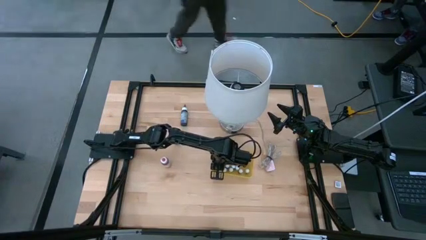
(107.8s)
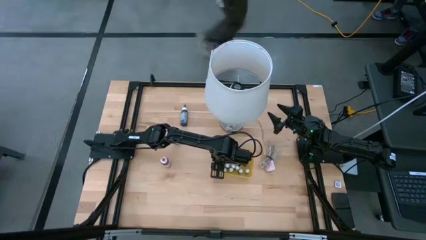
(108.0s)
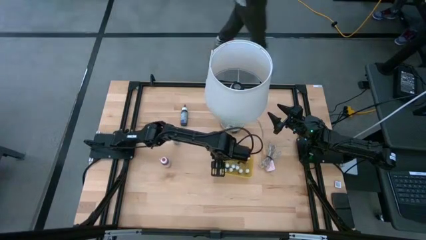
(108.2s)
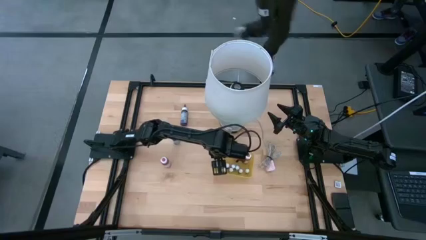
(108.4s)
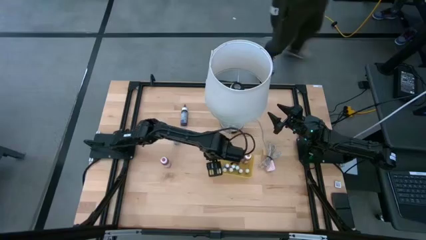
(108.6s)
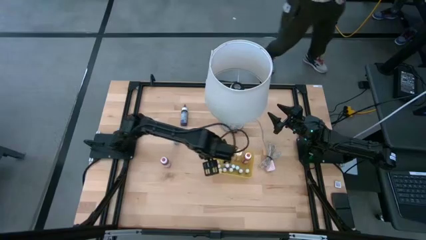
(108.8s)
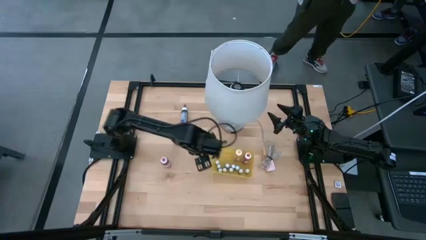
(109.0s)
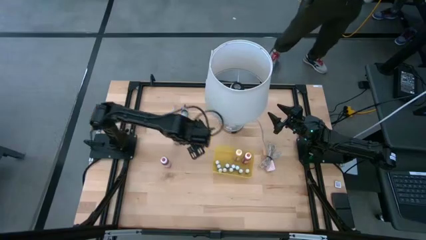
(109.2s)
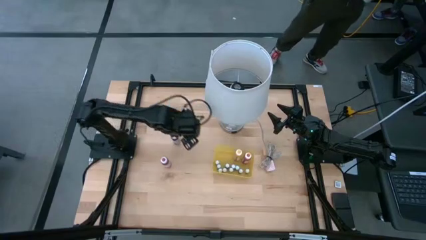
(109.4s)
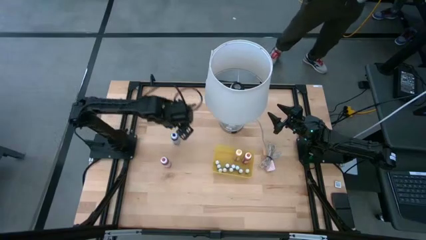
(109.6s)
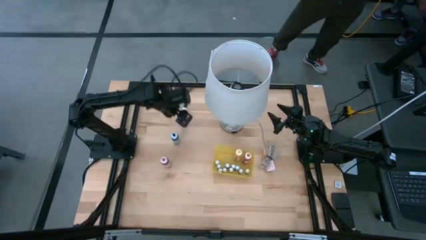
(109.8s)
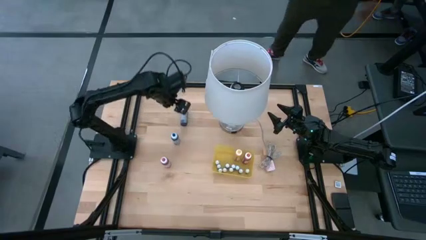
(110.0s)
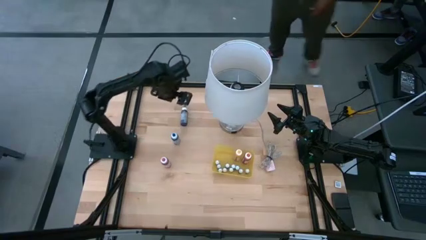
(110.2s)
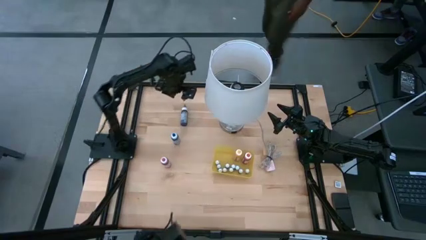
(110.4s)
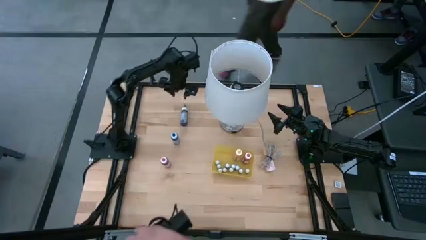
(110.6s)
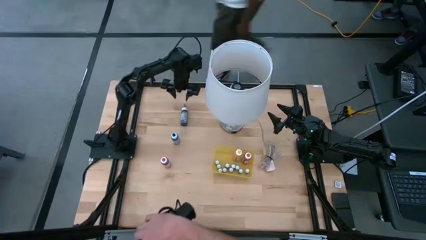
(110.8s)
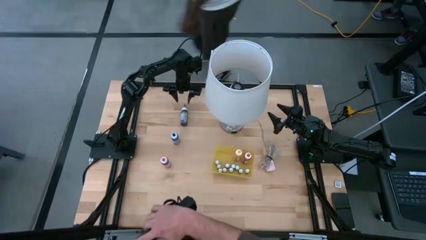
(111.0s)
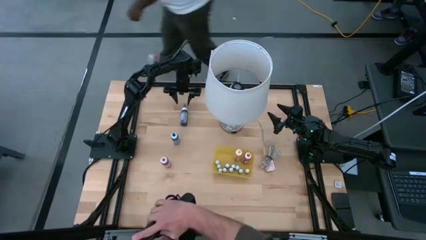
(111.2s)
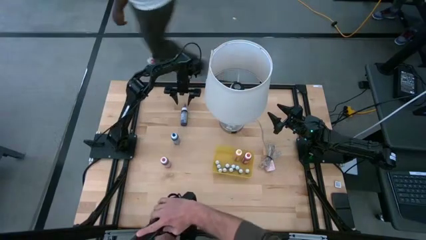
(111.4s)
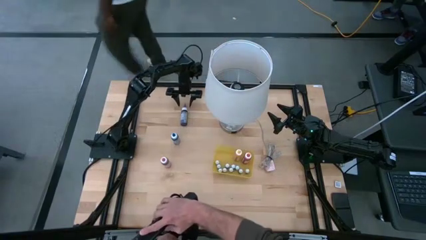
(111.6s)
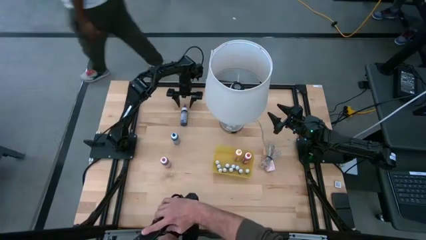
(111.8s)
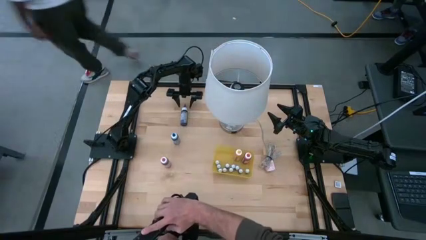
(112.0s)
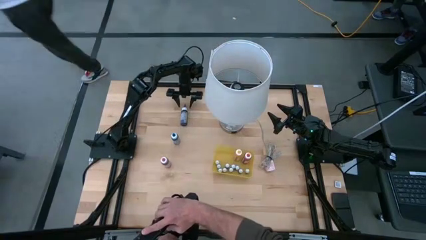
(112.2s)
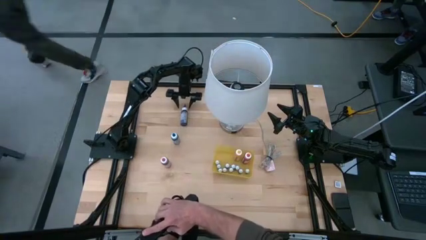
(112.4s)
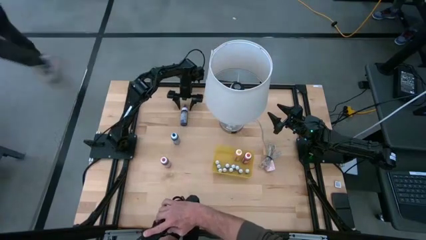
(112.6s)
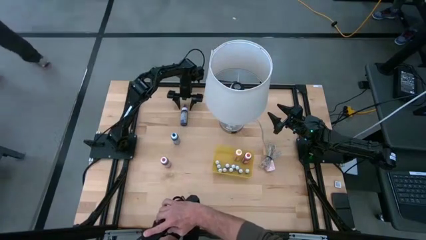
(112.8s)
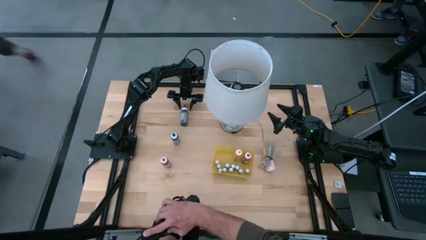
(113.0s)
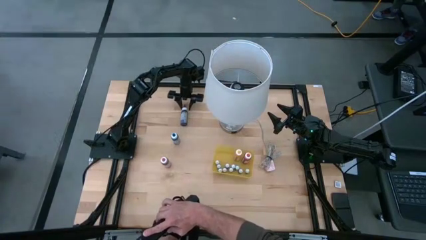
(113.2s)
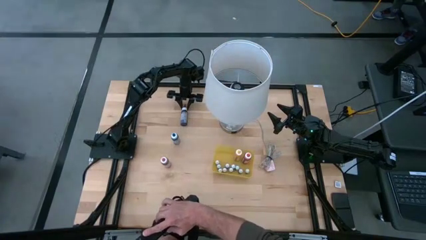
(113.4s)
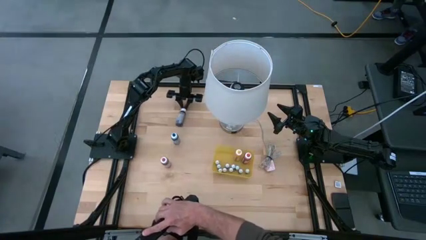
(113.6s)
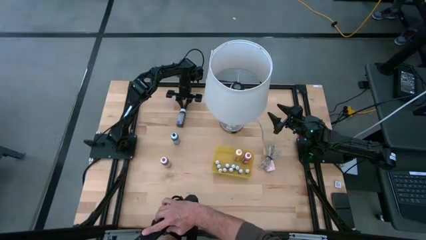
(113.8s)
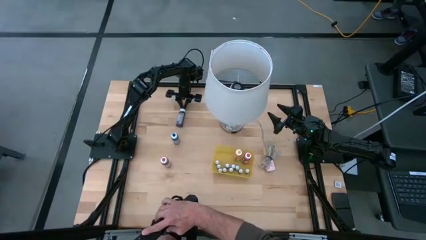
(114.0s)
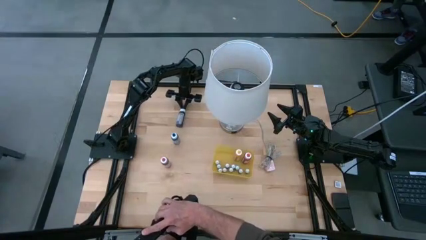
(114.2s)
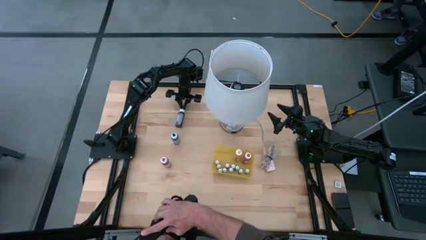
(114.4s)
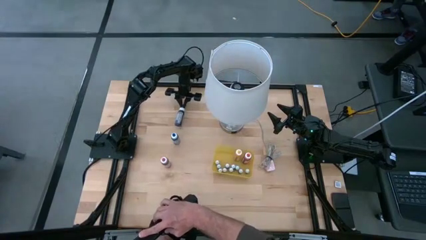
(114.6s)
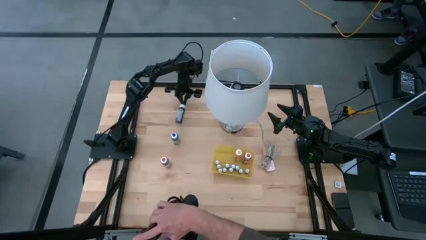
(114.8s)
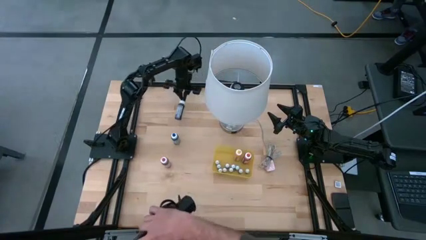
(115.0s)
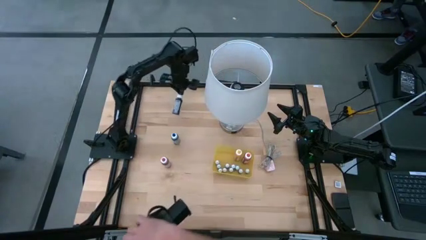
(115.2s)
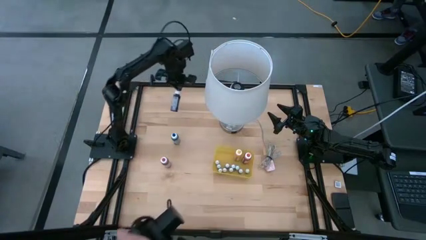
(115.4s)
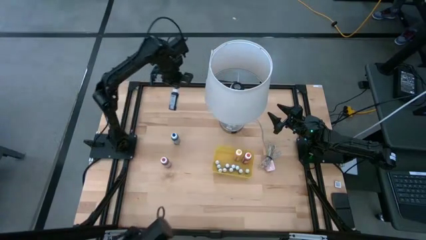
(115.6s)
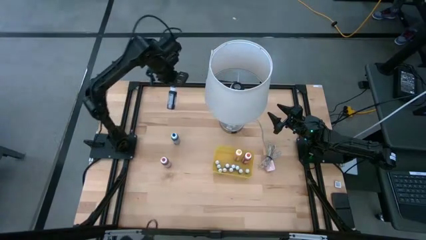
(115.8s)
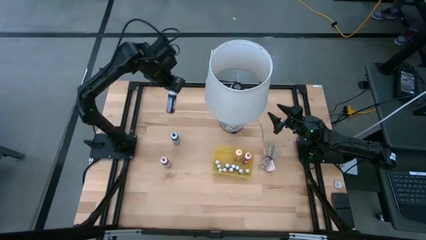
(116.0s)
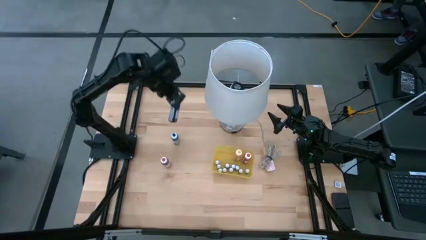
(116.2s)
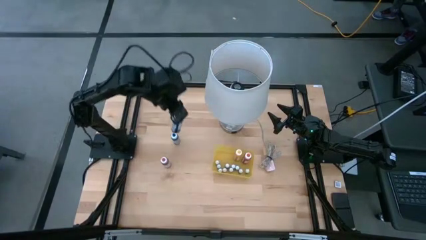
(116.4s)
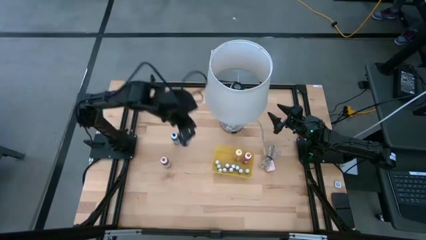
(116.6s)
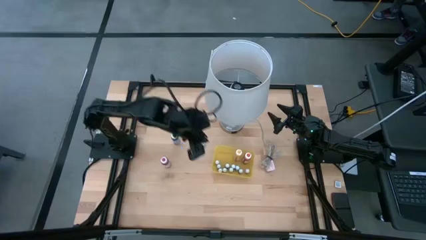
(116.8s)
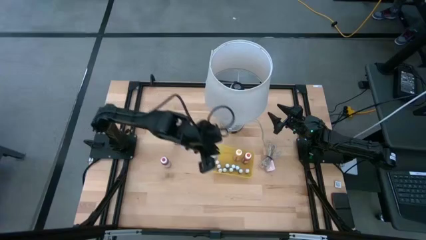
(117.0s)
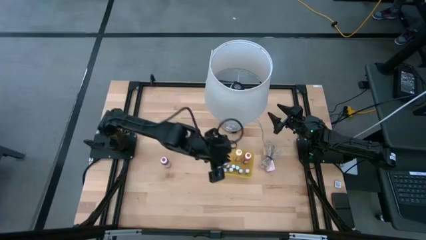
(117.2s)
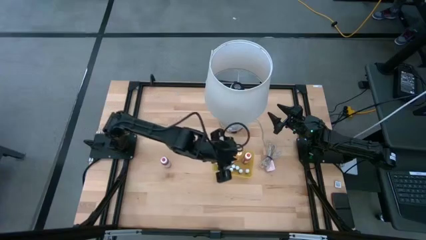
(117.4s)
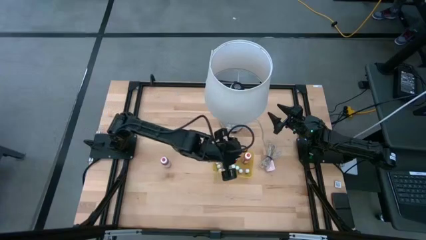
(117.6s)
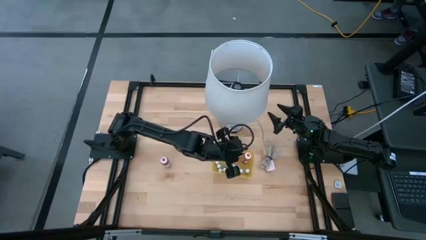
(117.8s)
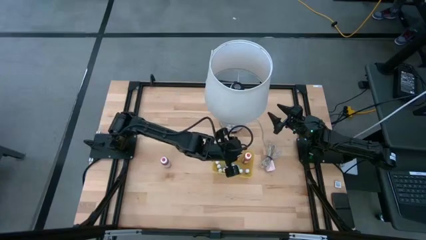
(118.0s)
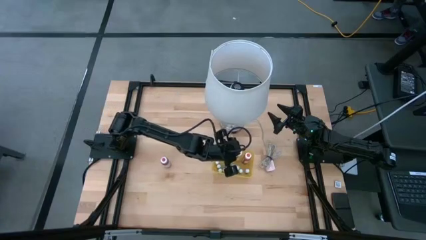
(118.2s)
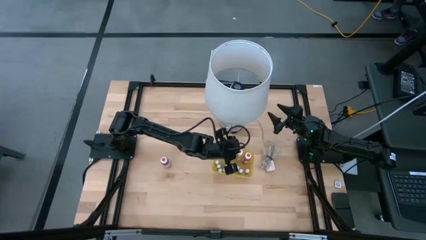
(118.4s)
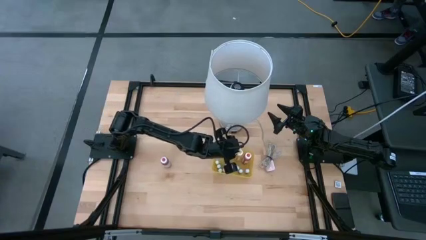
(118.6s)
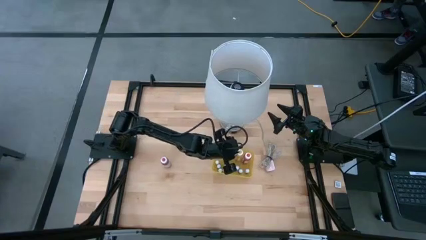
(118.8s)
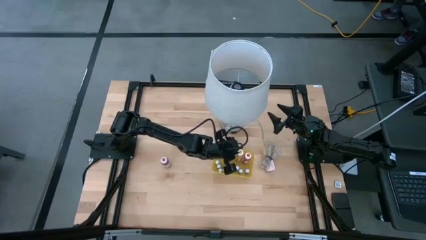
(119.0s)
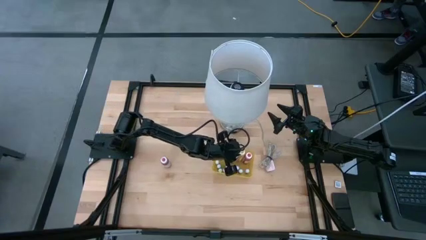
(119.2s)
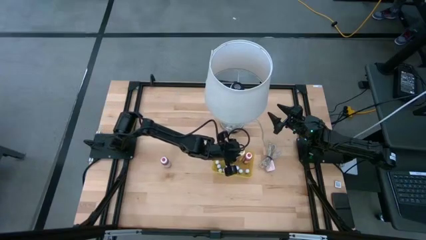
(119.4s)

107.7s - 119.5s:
Task: Pick & Place food coloring
Put the purple food coloring bottle into the yellow bin

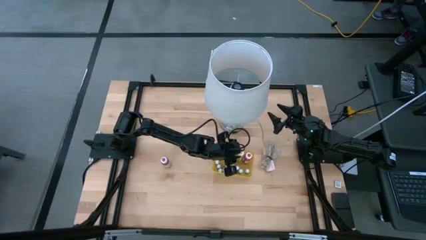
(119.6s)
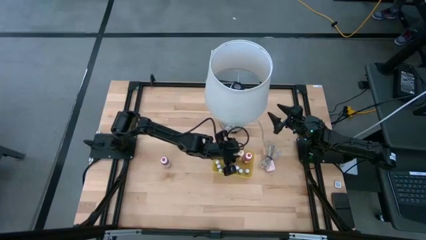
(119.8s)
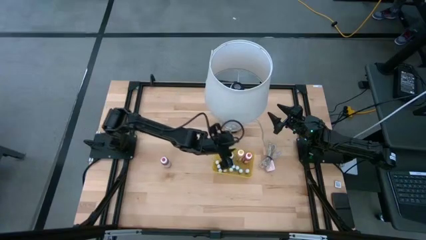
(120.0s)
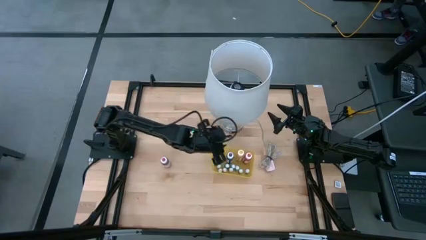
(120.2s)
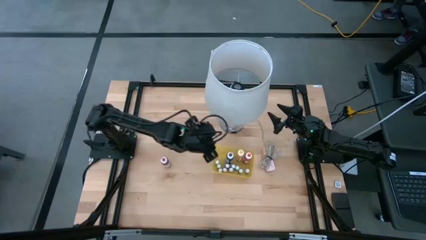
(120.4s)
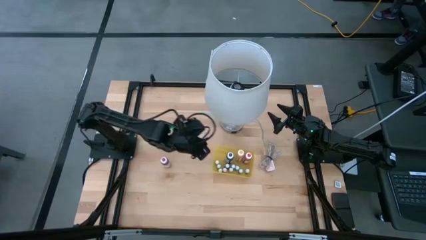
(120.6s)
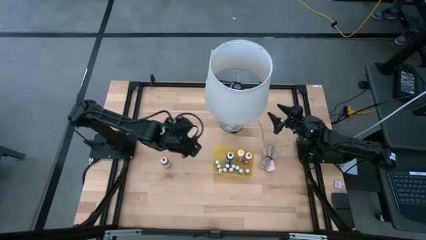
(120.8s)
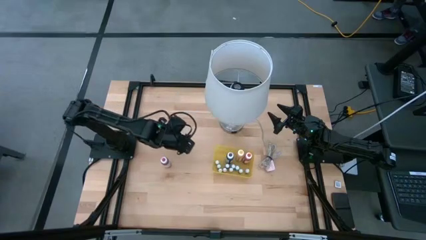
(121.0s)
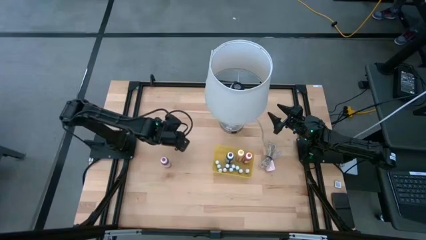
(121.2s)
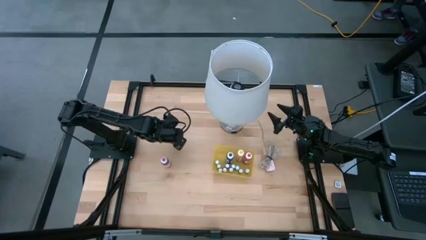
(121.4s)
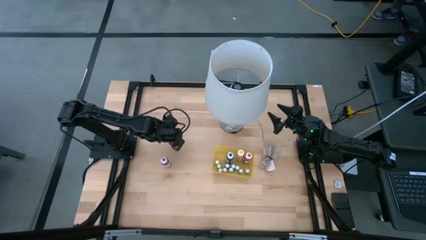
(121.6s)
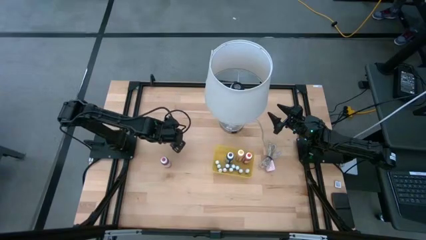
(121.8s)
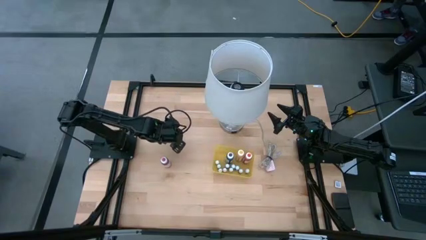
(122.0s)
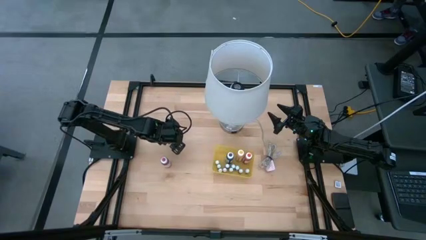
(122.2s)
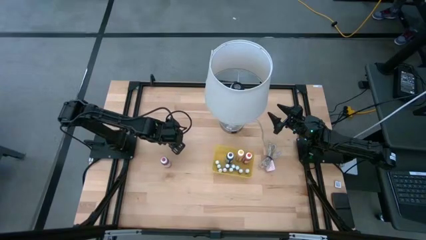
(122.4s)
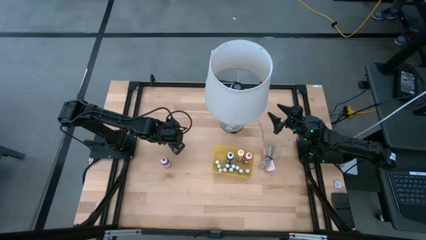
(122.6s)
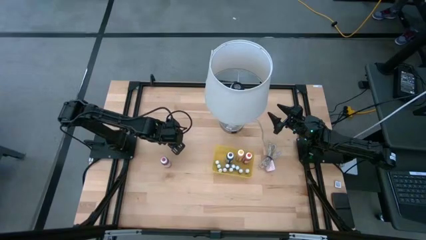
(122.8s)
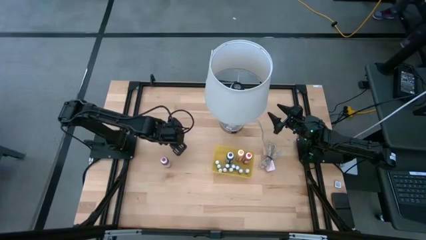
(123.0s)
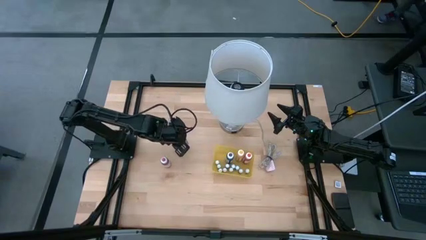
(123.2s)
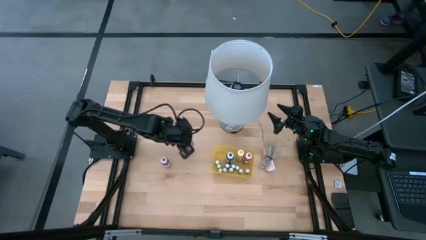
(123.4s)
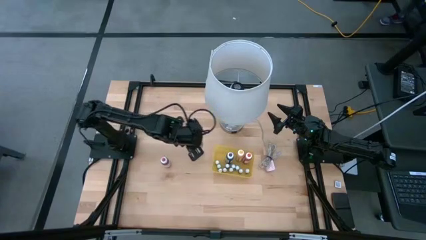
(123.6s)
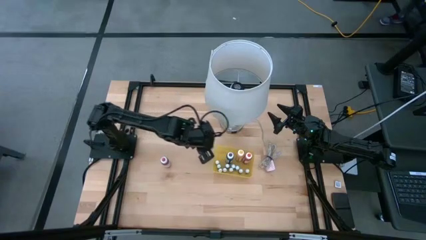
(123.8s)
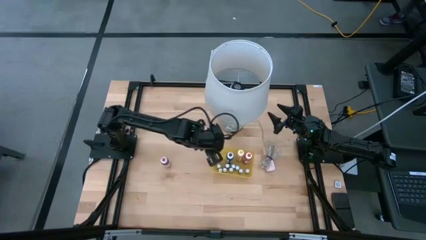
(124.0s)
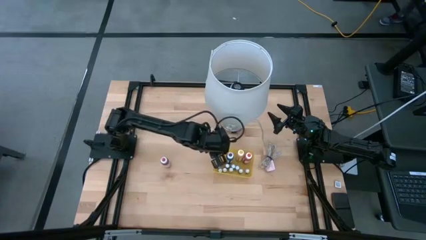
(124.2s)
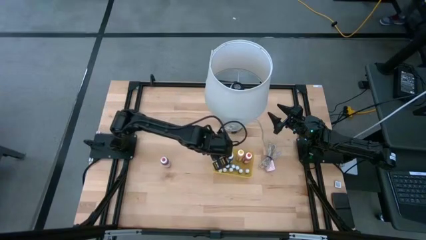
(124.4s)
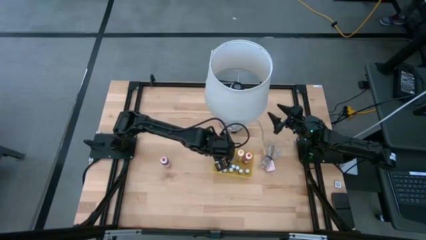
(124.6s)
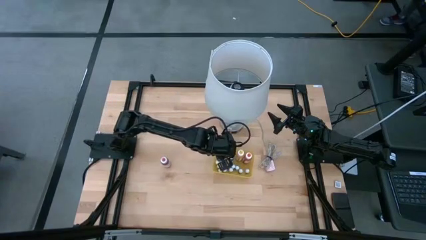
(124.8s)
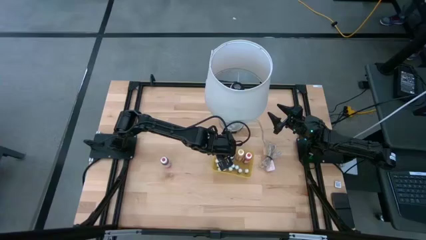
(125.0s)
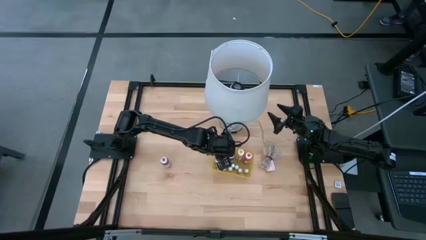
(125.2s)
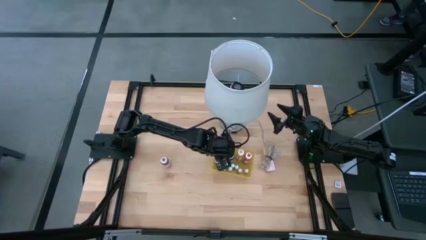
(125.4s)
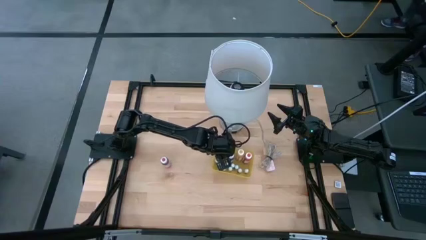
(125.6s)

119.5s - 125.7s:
Put the blue food coloring bottle into the yellow bin
